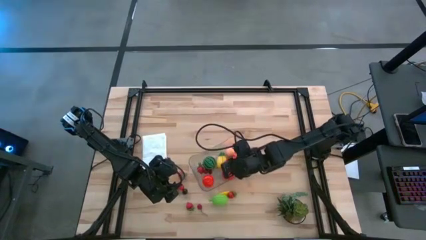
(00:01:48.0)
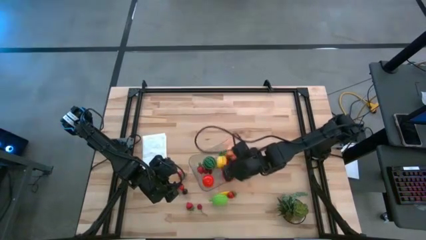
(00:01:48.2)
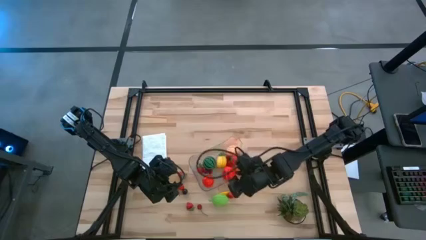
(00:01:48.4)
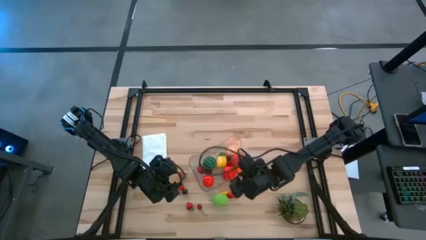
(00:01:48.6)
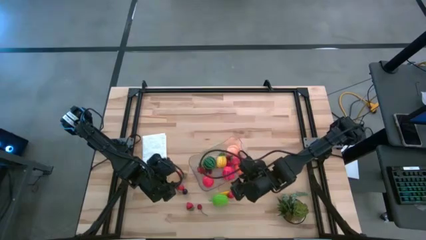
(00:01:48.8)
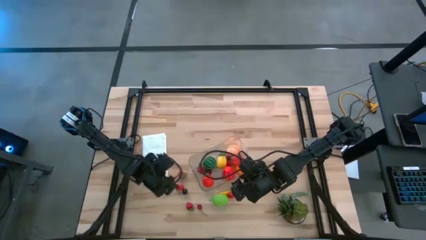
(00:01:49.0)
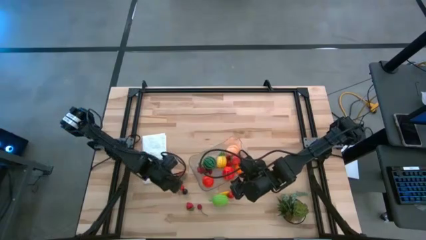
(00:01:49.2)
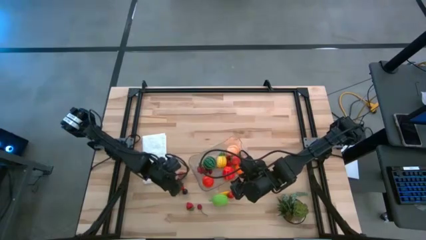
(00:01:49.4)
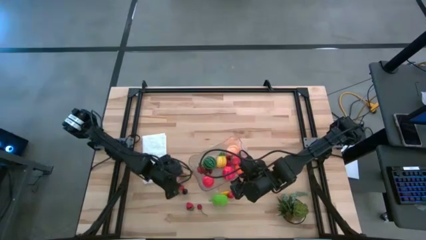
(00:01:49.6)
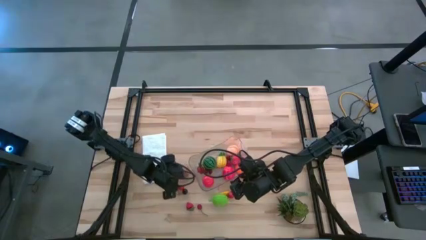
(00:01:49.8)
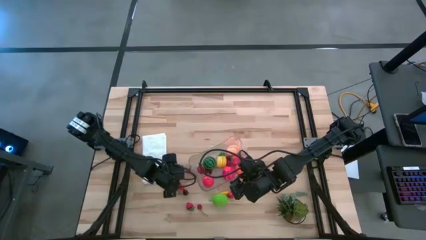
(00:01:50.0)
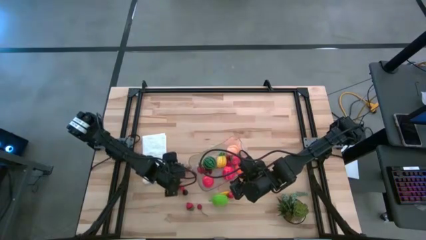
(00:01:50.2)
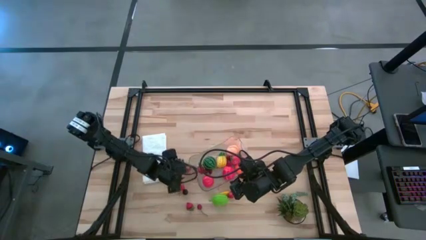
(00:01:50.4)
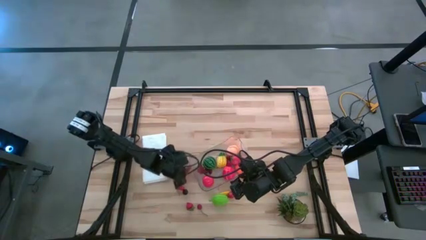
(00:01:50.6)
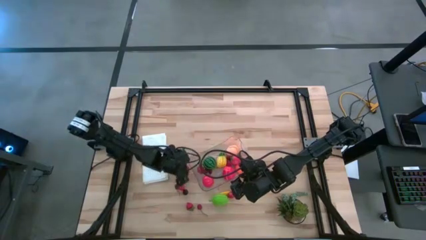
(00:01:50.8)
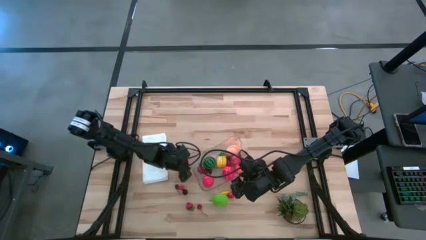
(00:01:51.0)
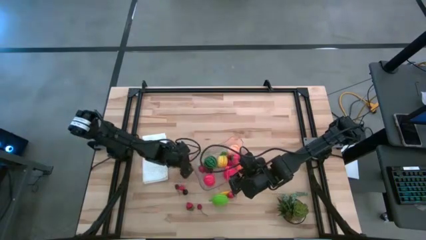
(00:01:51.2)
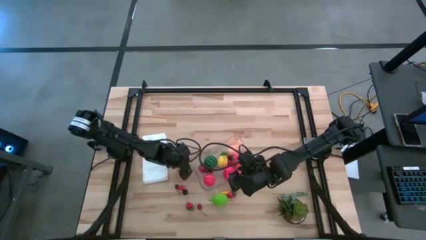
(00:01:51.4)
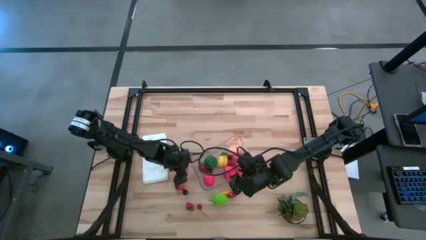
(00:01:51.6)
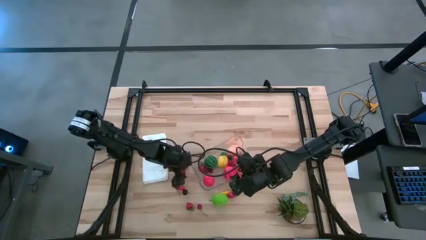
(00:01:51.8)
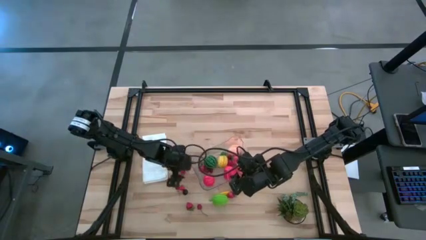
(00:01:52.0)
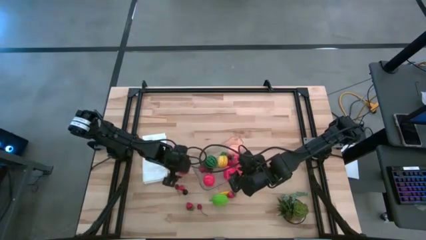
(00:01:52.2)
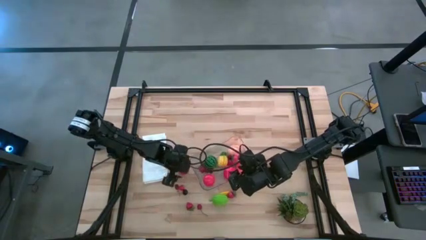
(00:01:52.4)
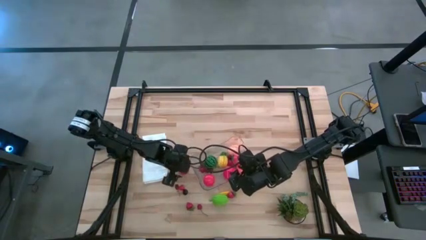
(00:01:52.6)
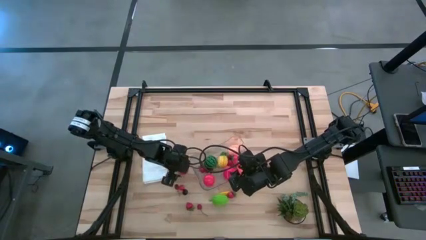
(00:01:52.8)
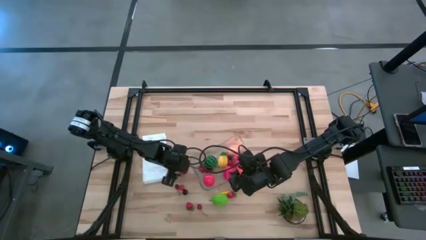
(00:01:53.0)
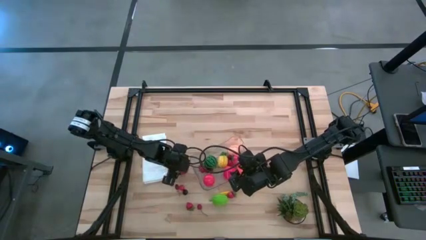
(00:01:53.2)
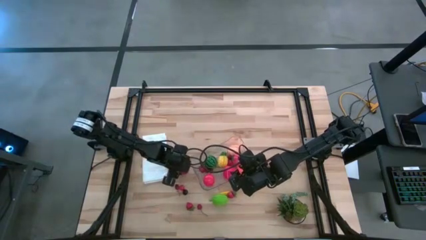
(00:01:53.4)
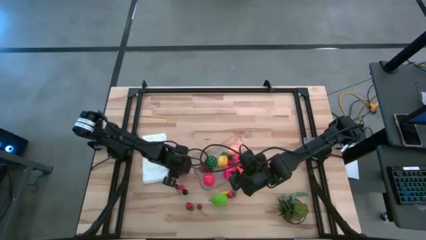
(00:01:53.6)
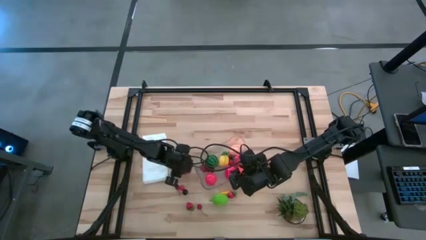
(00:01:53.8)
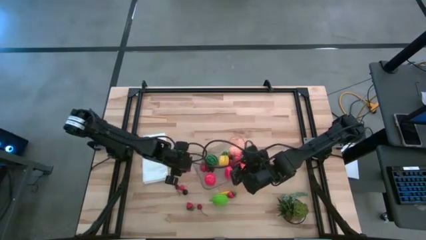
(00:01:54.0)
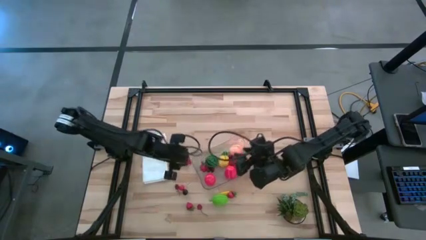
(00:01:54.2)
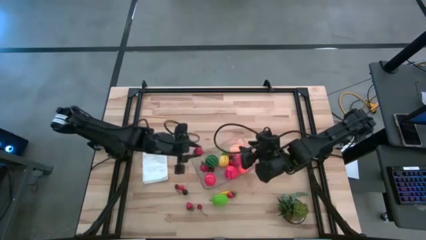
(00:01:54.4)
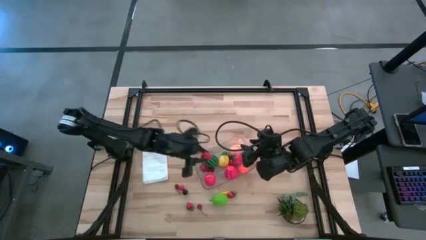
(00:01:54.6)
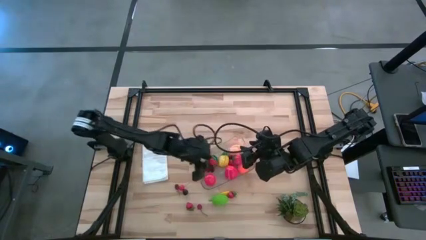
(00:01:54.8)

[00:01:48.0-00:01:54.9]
Task: Pick and placing Produce into tupperware
Put the top left strawberry into the transparent bin

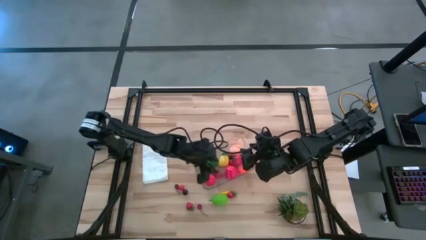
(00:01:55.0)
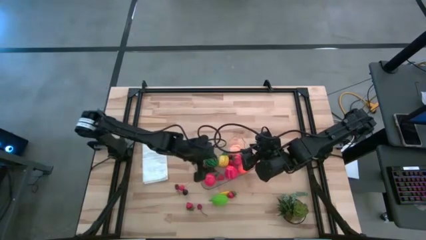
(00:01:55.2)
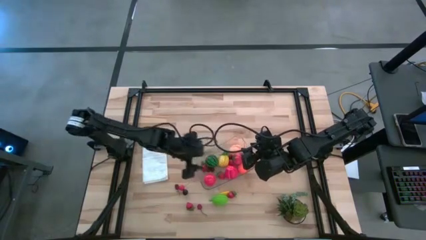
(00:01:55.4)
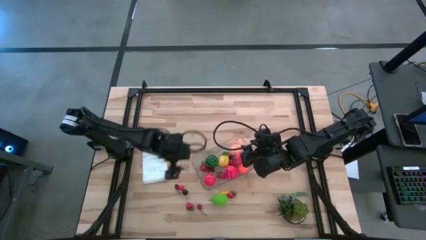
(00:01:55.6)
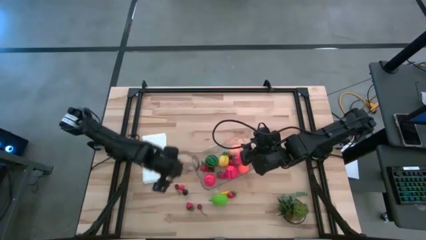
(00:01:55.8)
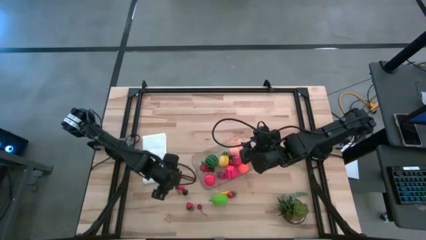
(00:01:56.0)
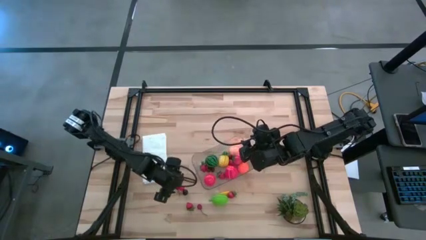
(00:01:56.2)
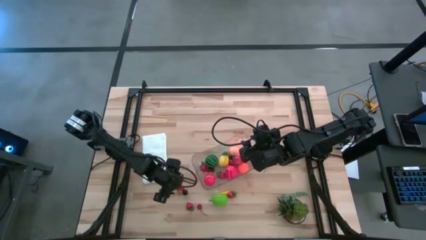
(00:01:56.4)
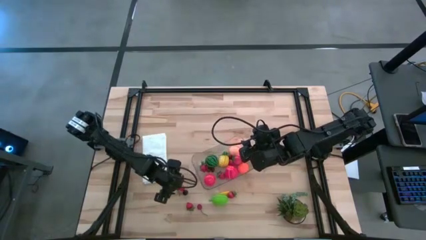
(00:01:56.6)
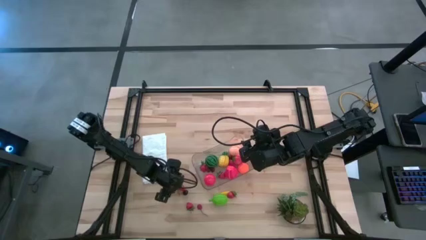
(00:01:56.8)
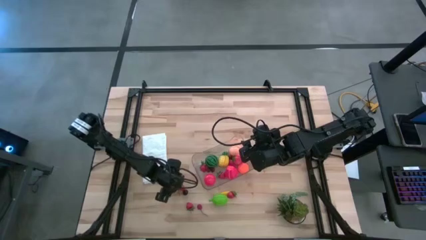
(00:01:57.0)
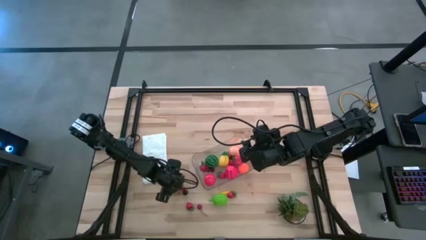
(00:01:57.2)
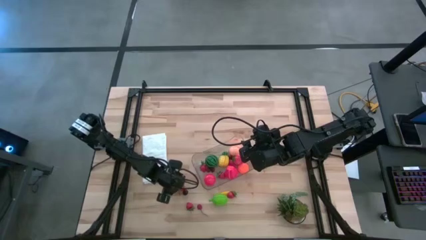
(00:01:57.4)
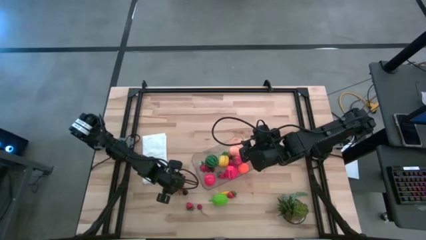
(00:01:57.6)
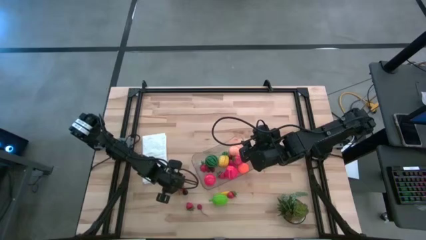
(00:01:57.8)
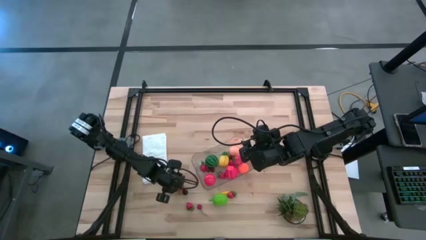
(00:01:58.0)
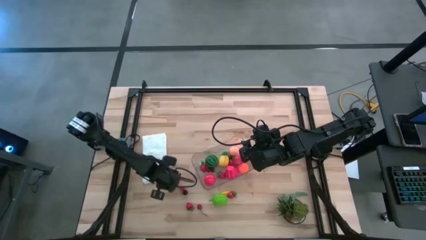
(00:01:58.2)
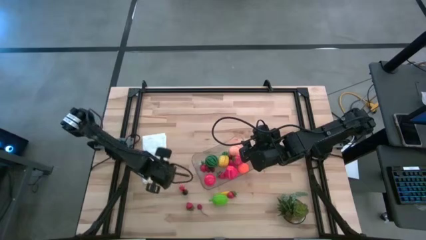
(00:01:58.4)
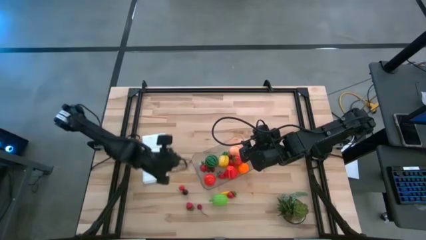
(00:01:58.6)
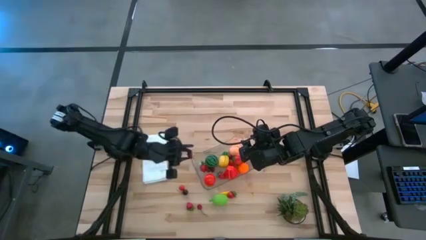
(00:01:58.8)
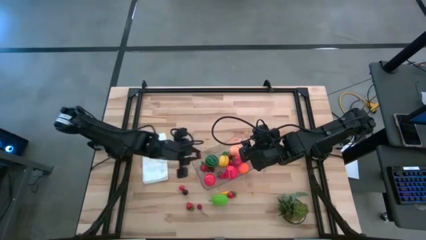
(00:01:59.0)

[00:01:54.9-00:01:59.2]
Put the top dark red cherry into the transparent bin

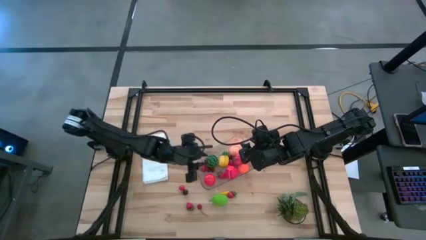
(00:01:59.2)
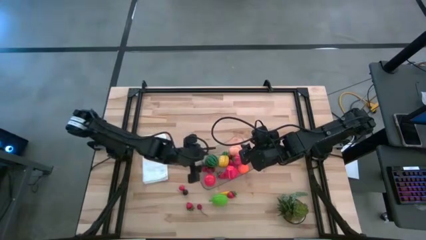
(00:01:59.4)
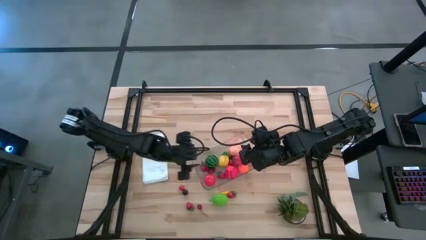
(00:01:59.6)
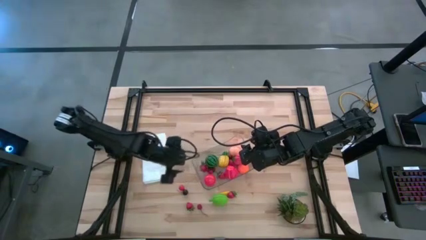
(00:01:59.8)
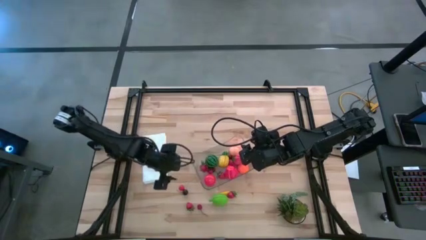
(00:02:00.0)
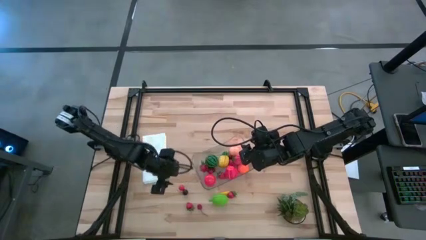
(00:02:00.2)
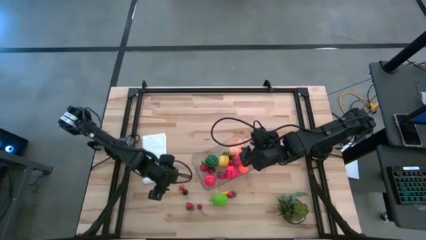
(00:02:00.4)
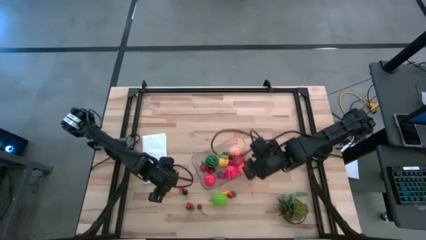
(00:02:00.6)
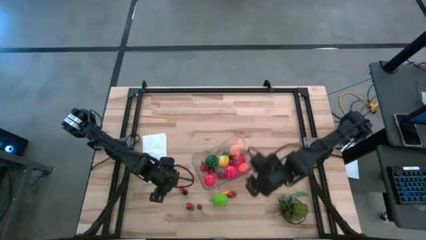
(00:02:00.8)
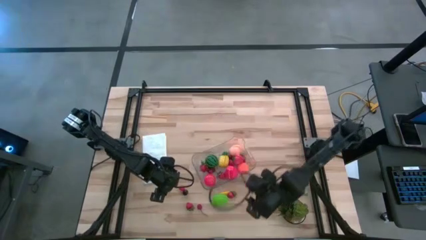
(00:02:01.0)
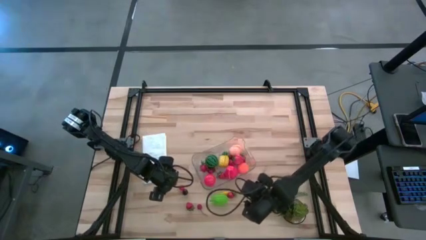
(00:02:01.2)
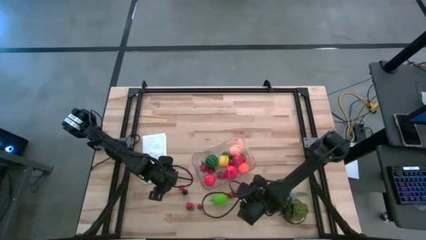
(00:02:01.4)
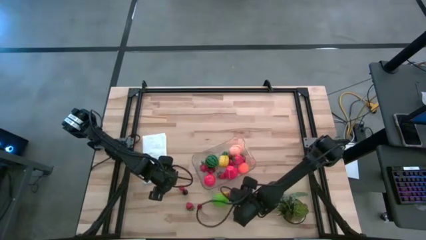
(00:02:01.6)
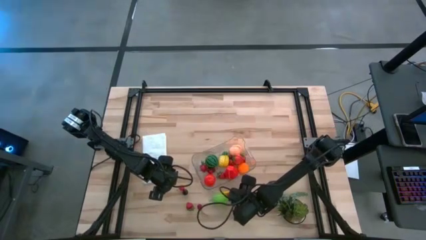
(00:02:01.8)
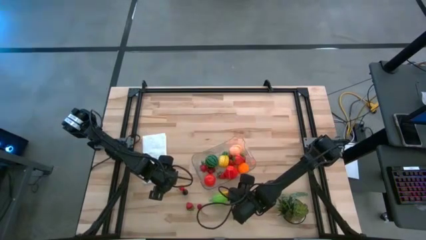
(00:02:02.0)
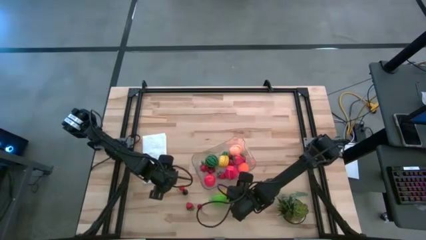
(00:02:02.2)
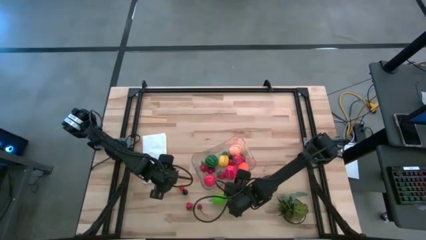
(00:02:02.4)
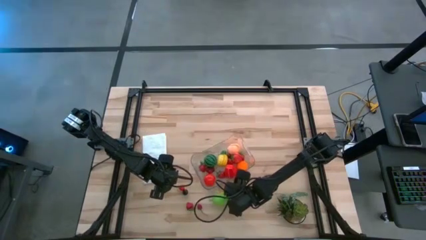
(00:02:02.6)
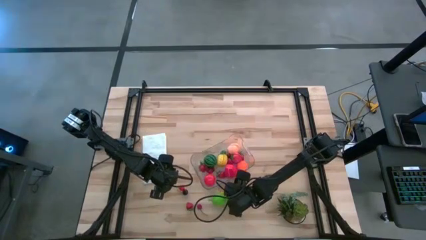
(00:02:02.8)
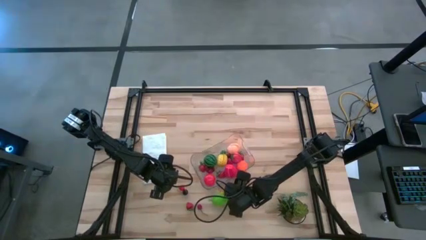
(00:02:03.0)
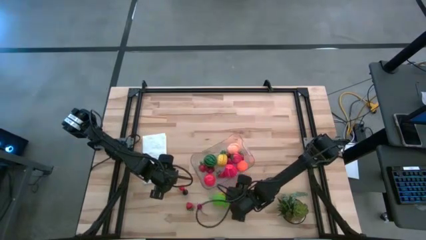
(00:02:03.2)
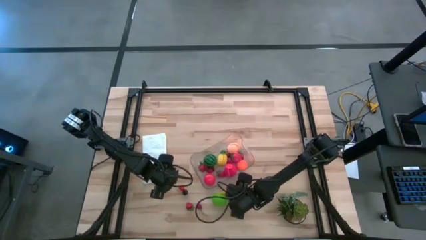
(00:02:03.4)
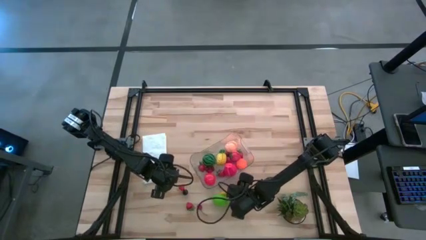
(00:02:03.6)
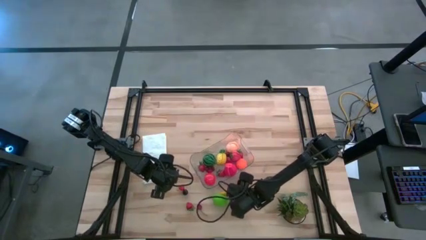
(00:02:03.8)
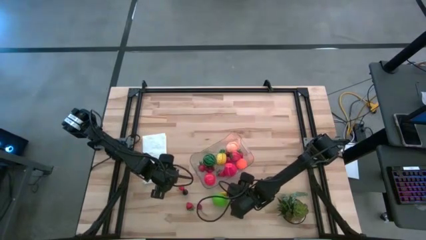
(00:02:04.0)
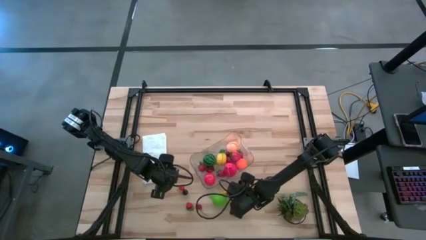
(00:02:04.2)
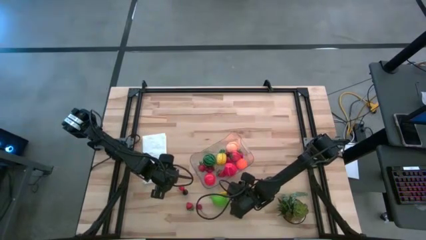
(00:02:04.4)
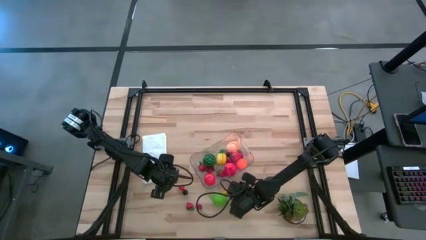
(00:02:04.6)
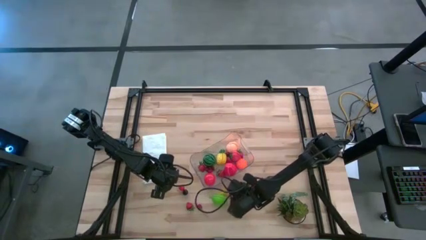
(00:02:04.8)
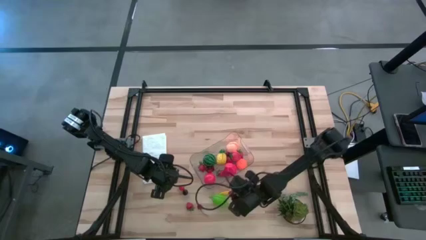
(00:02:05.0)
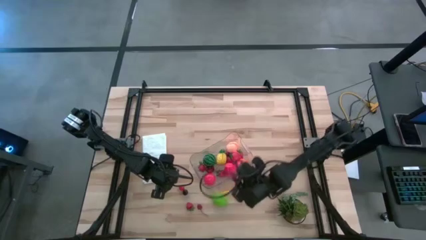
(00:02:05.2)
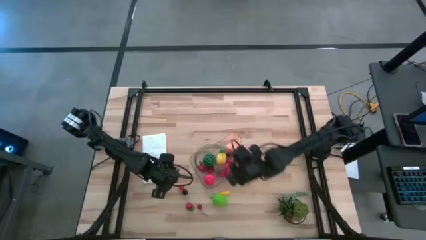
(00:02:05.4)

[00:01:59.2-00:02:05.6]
Put the right strawberry into the transparent bin

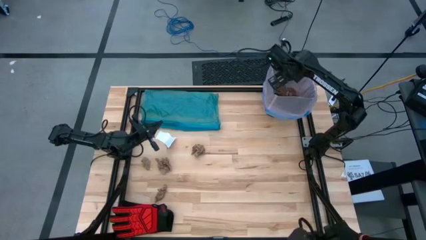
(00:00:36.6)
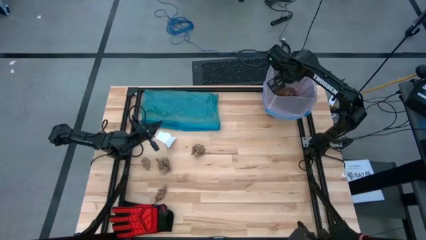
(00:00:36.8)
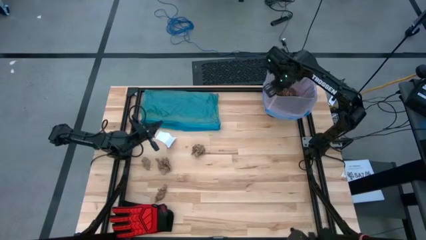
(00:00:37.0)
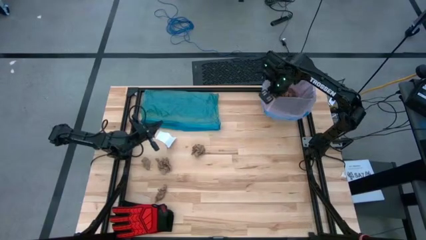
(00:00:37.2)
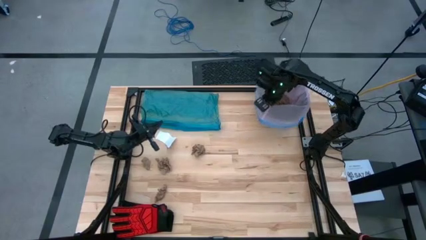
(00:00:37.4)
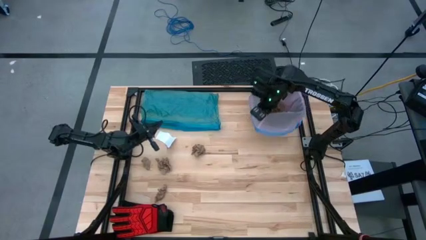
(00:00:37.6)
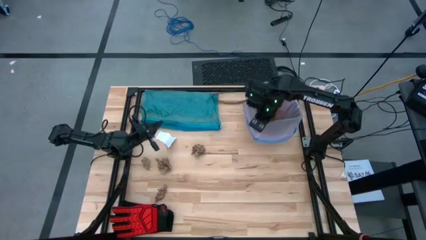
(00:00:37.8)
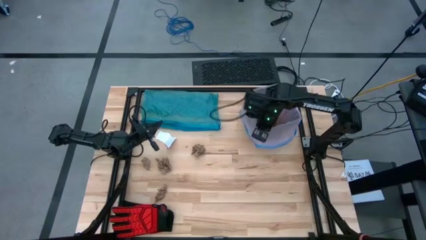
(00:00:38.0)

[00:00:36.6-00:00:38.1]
Task: place trash/remove bag and relplace
Move the trash bin closer to the center of the table
